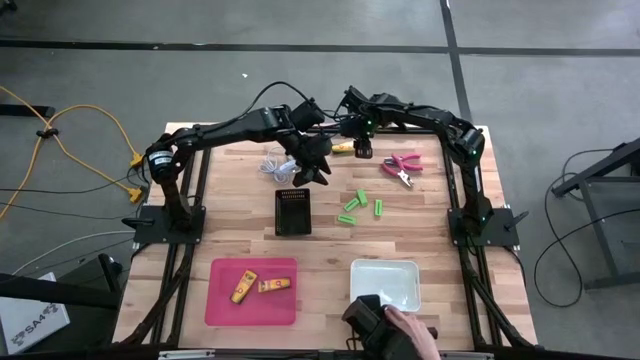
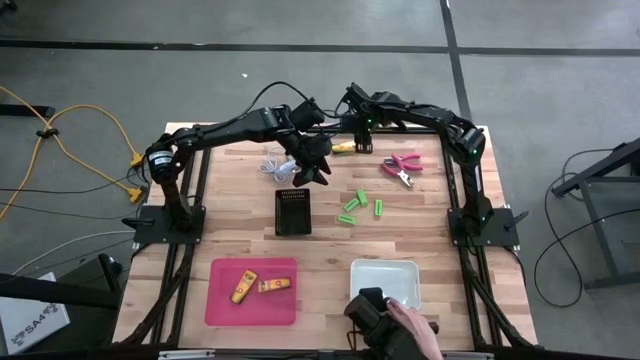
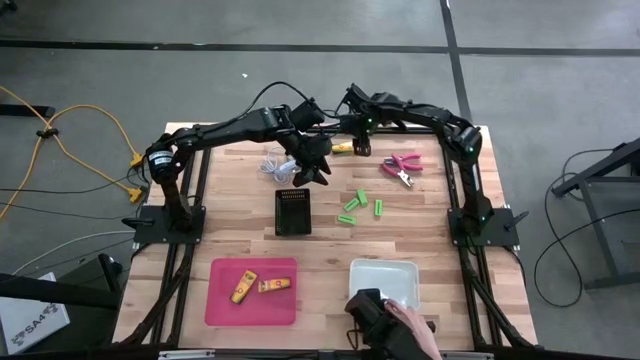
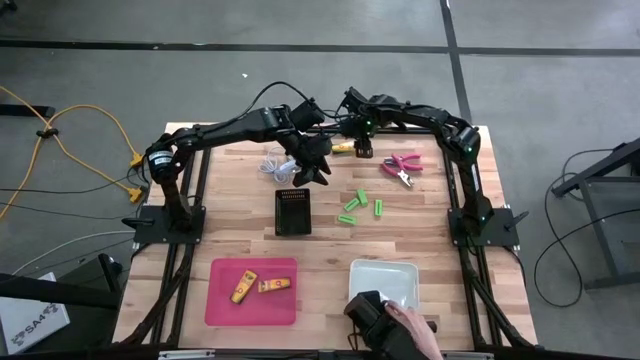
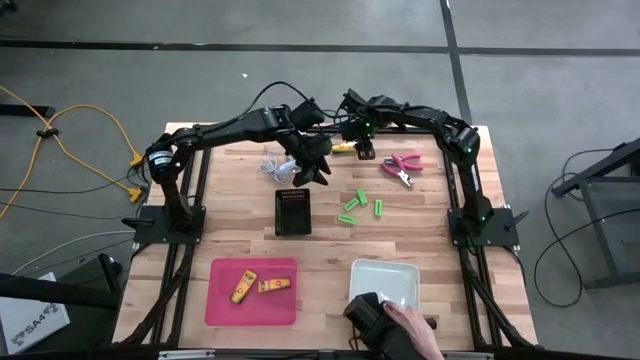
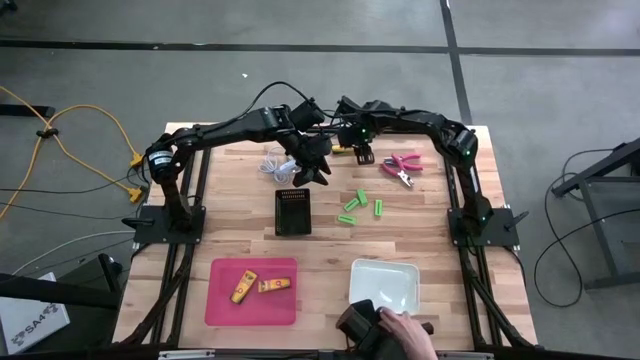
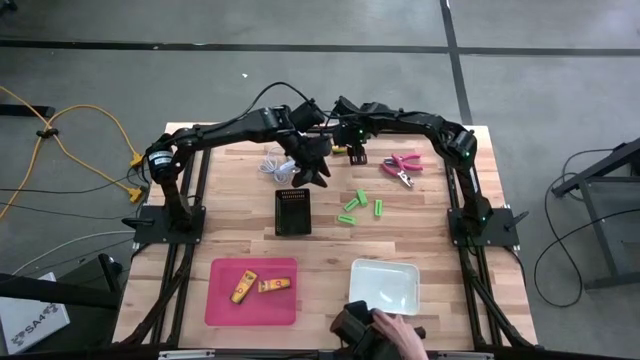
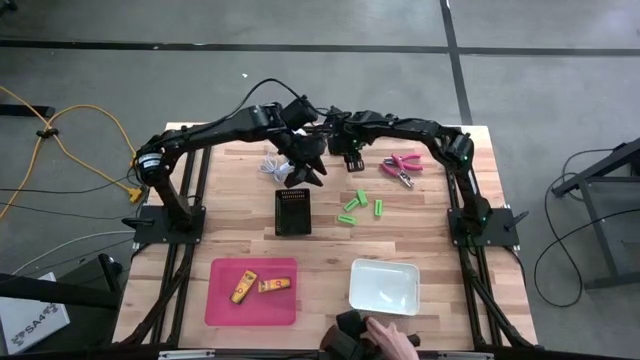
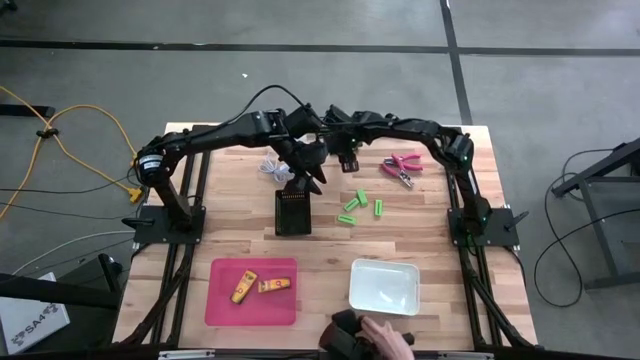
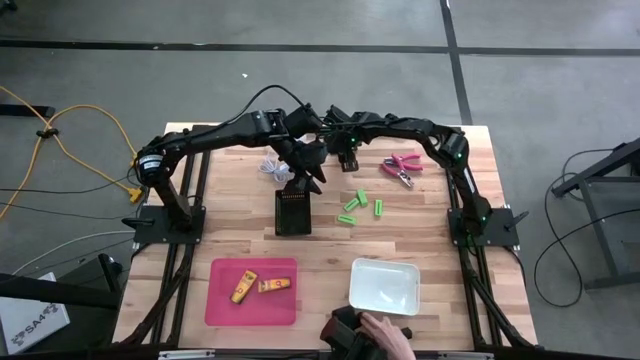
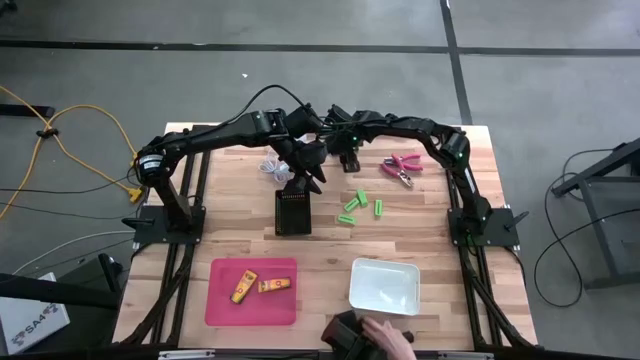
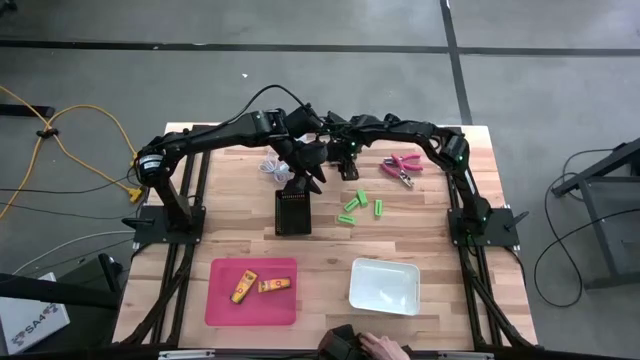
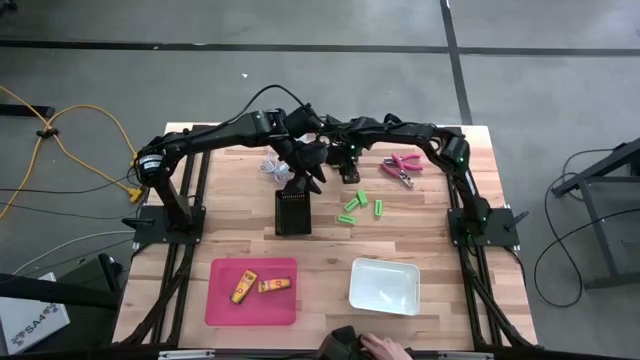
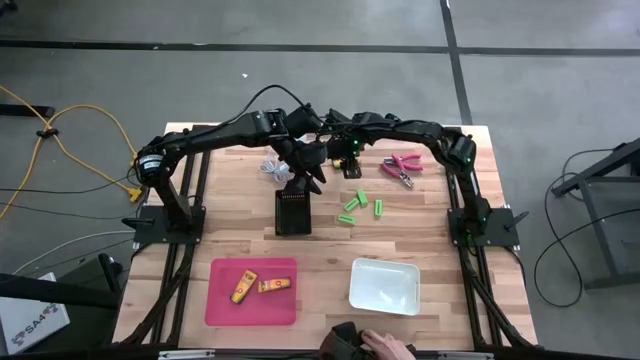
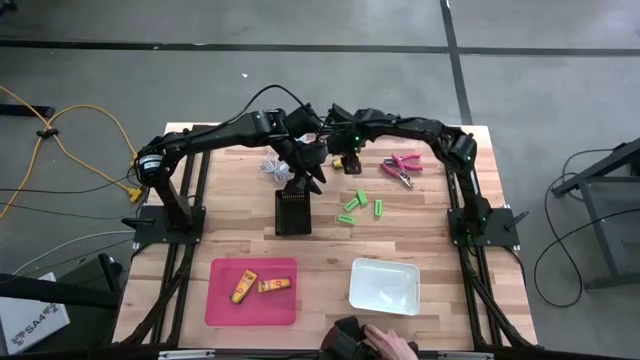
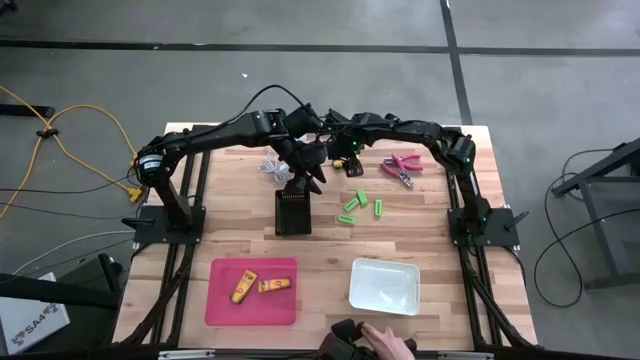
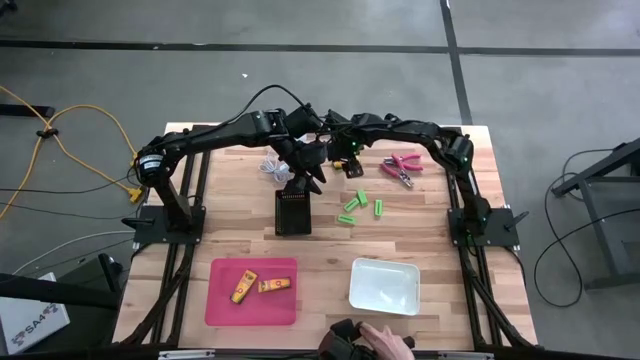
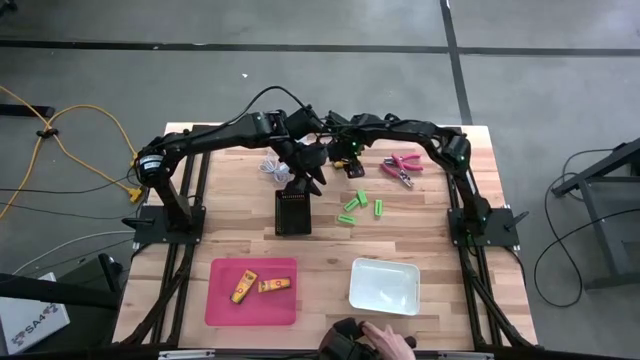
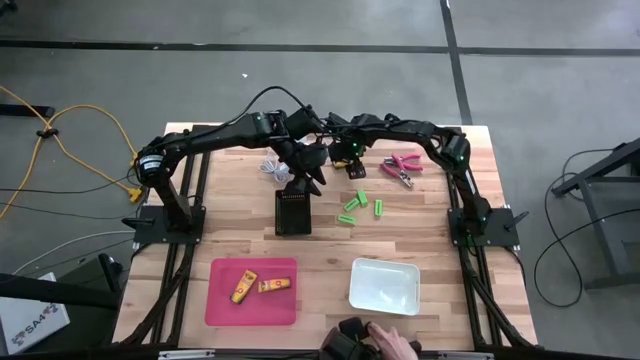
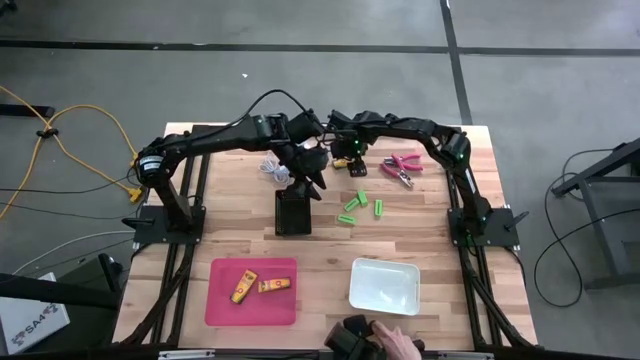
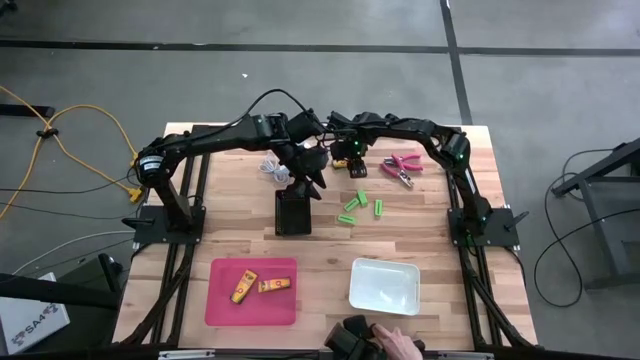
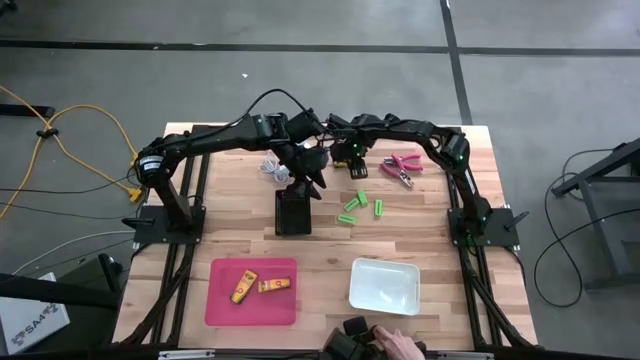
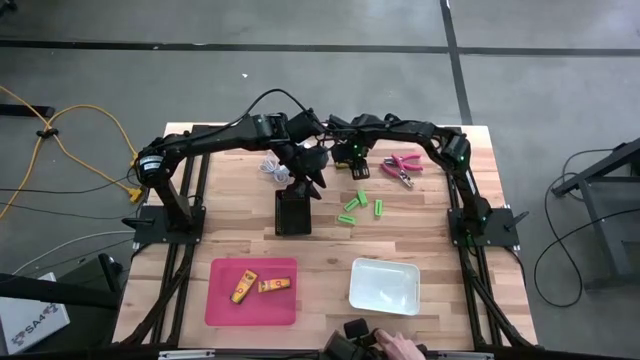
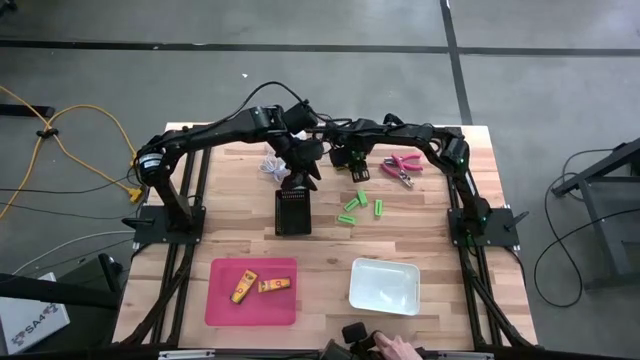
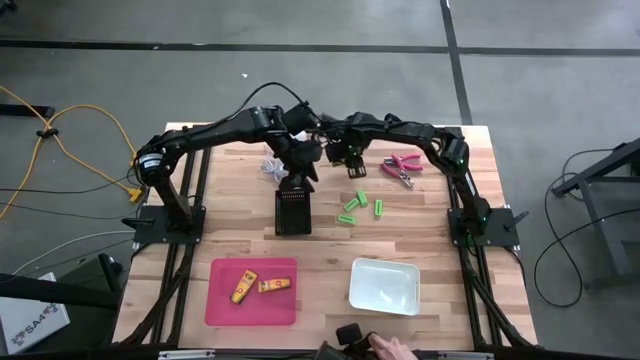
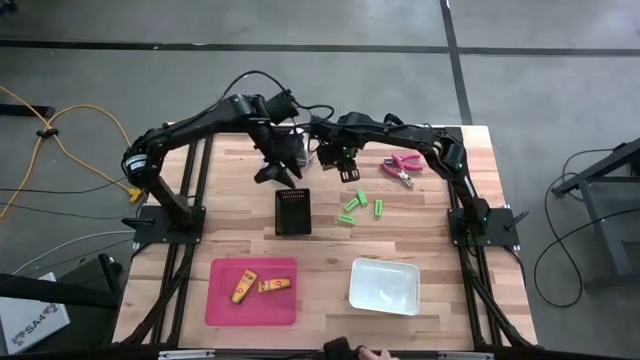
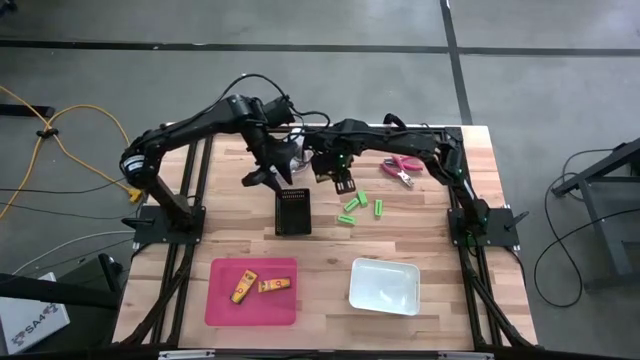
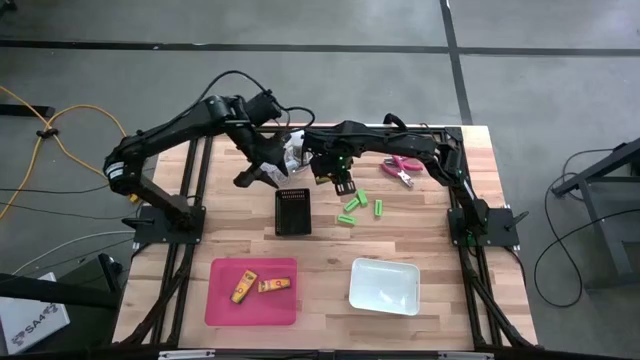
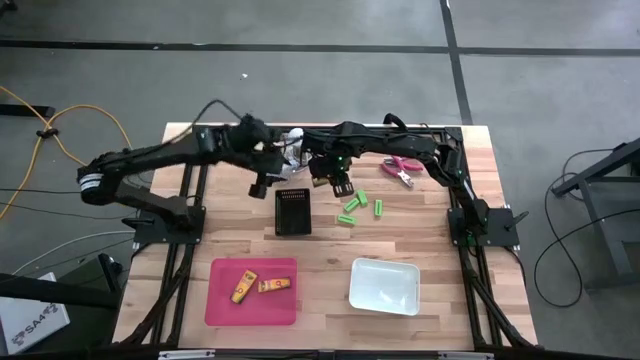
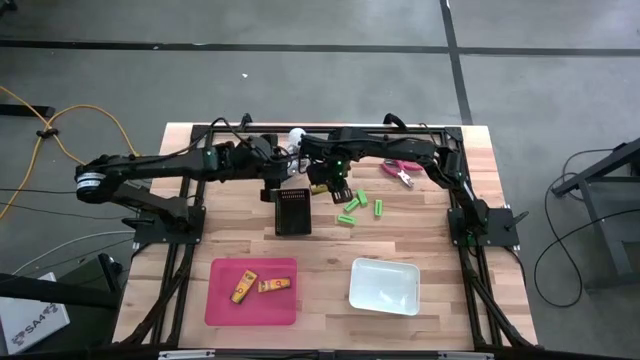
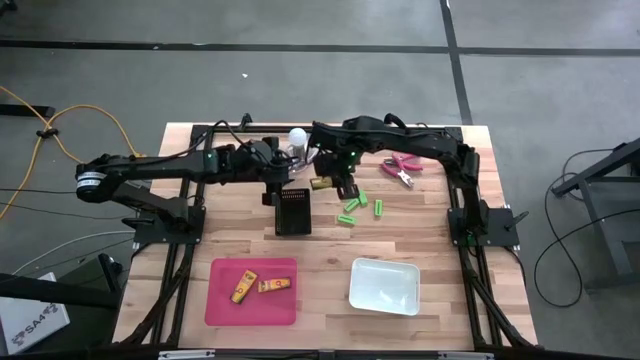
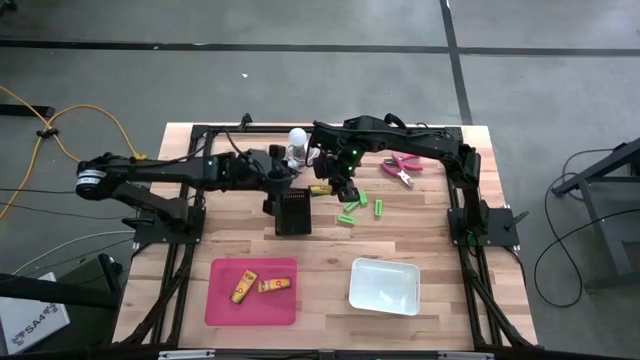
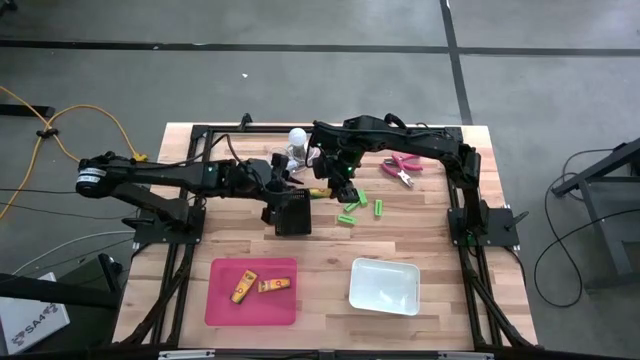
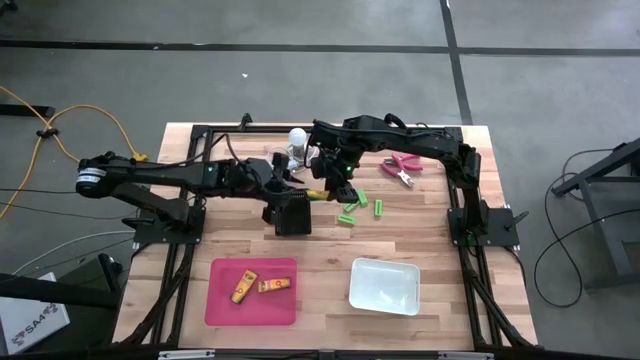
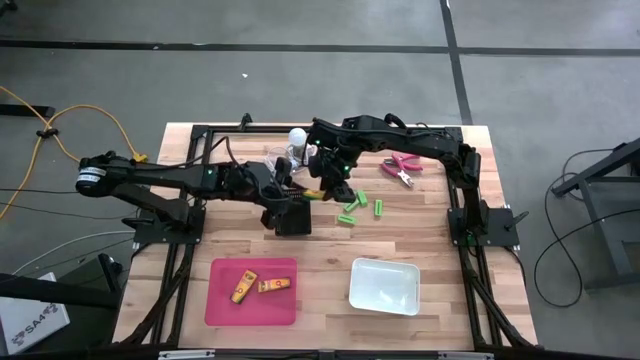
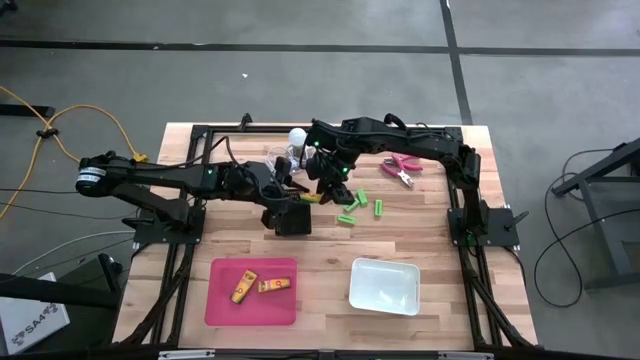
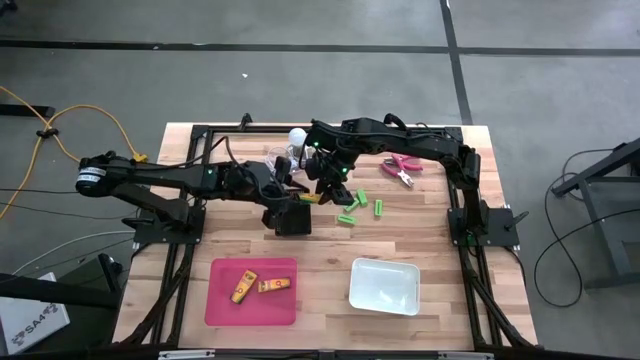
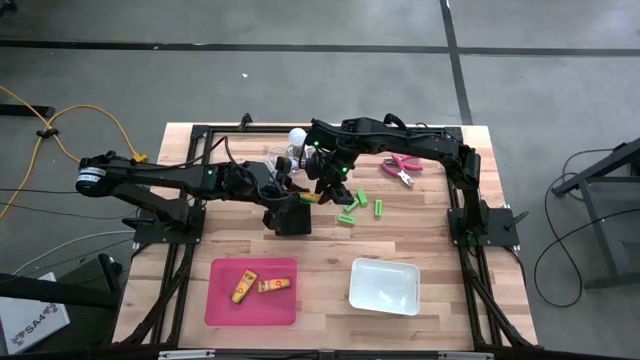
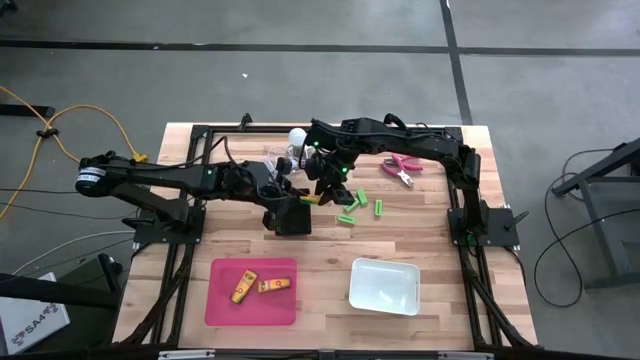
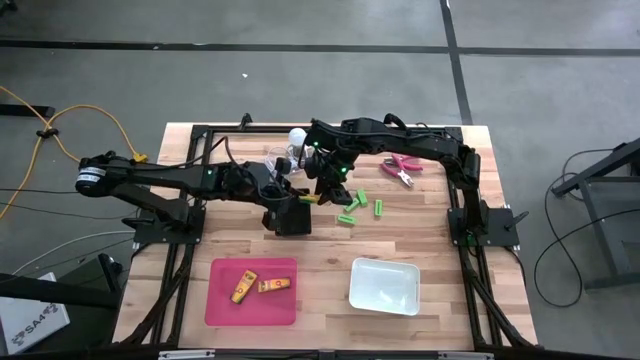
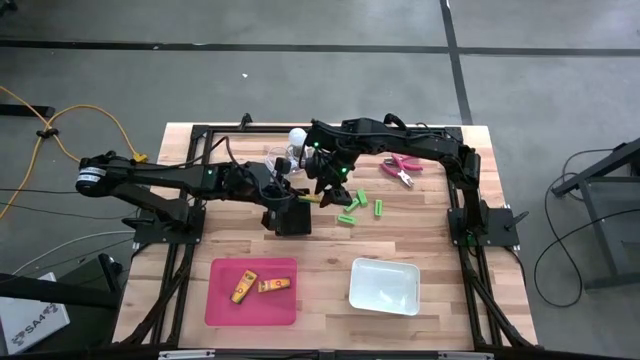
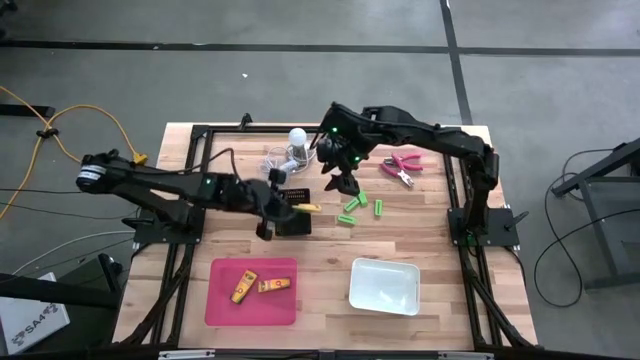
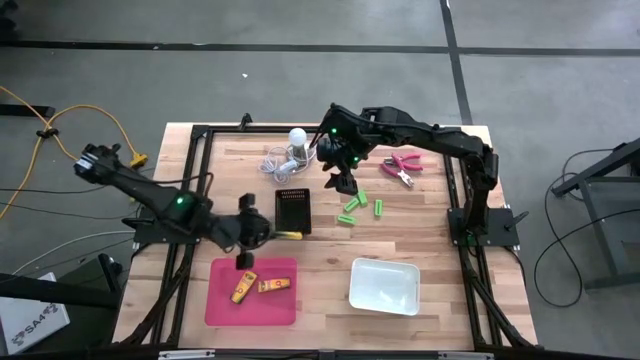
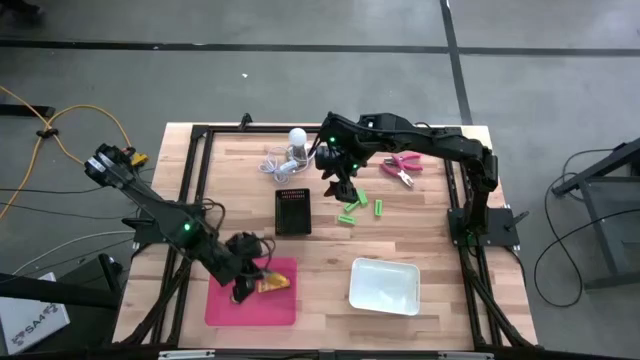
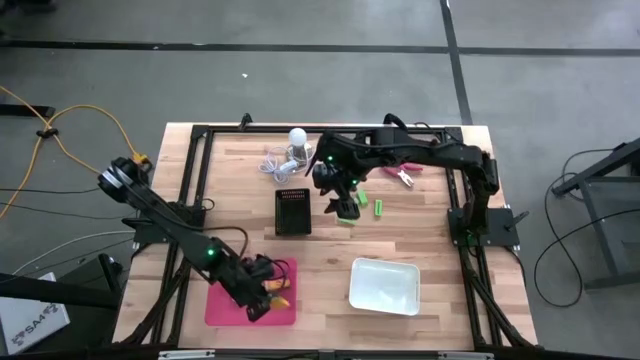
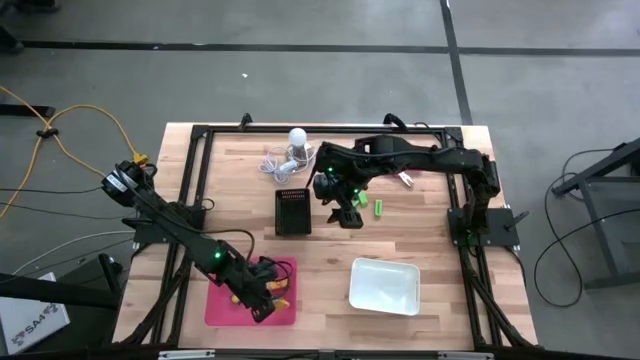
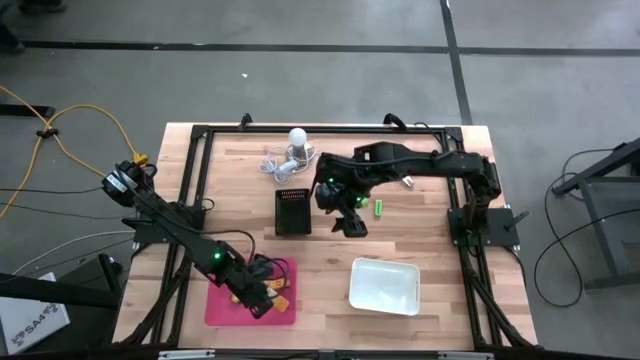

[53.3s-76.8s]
Task: Pick & Place School Supplies
Put the yellow crayon box into the pink bin
